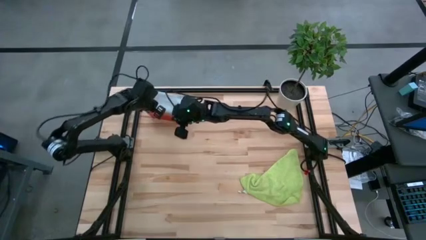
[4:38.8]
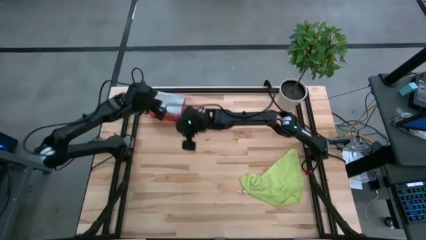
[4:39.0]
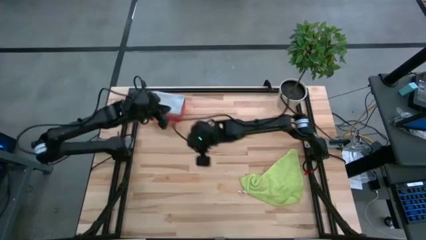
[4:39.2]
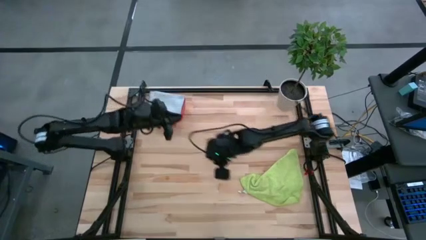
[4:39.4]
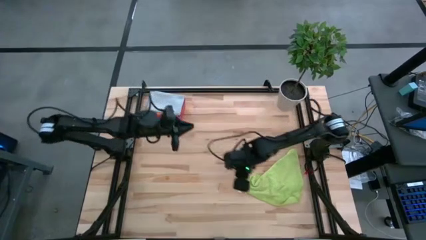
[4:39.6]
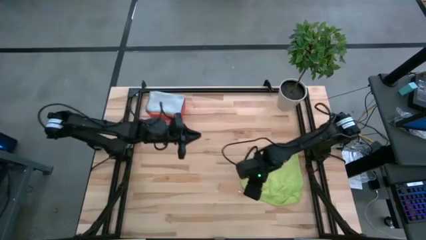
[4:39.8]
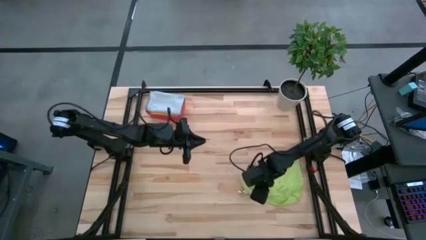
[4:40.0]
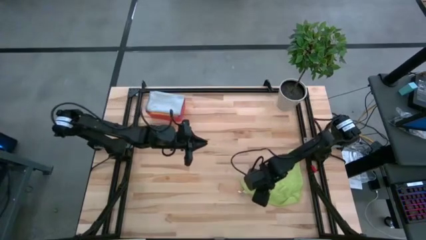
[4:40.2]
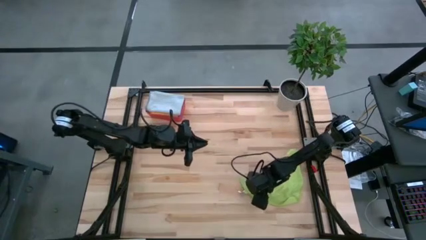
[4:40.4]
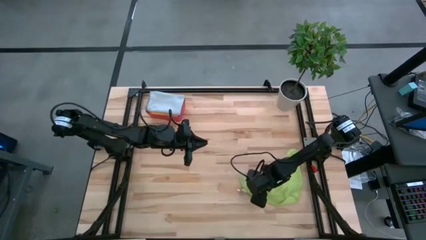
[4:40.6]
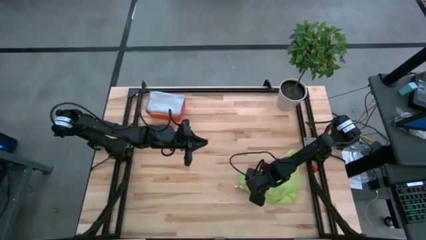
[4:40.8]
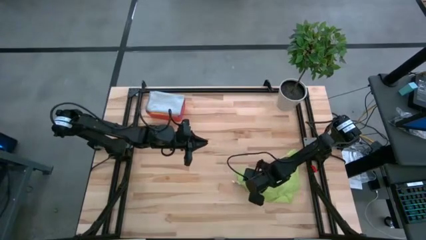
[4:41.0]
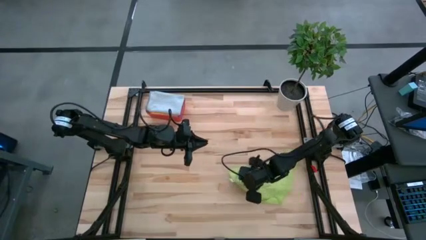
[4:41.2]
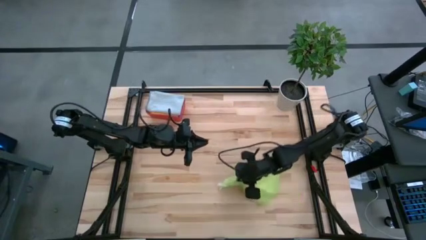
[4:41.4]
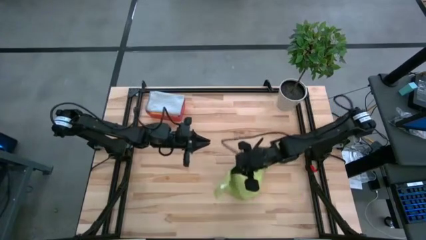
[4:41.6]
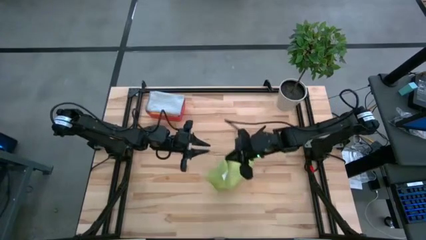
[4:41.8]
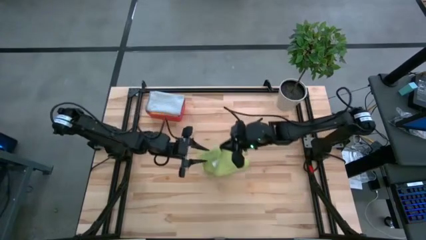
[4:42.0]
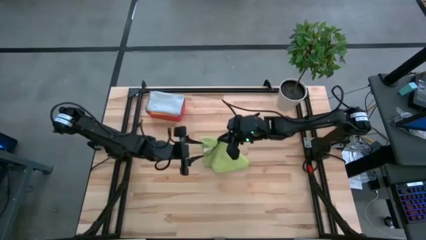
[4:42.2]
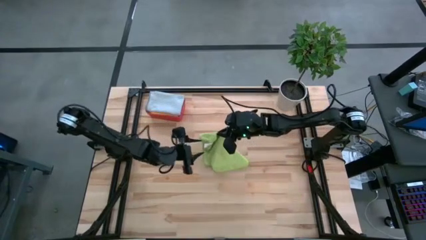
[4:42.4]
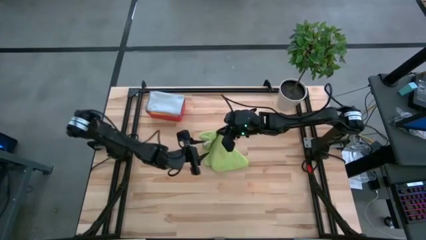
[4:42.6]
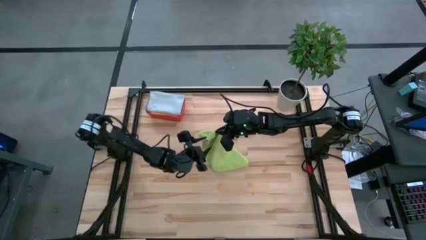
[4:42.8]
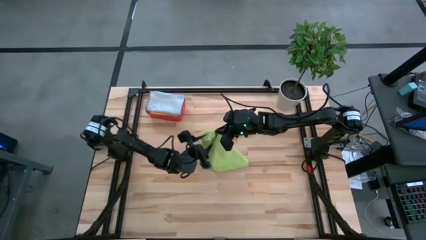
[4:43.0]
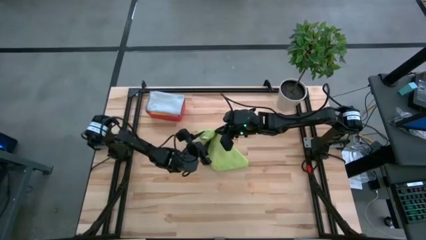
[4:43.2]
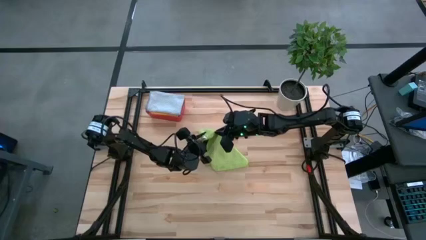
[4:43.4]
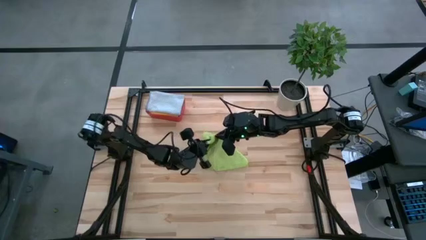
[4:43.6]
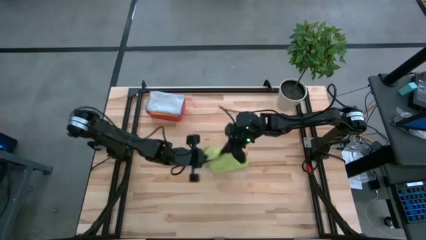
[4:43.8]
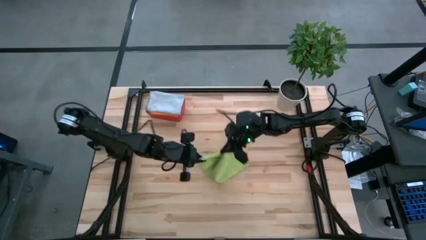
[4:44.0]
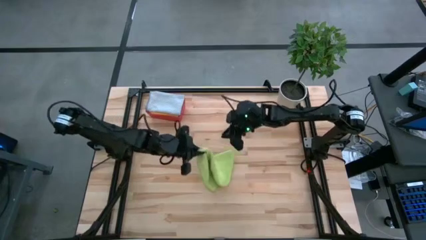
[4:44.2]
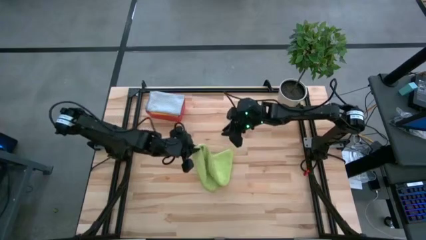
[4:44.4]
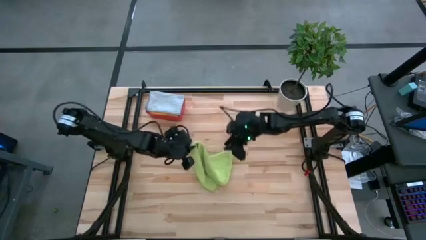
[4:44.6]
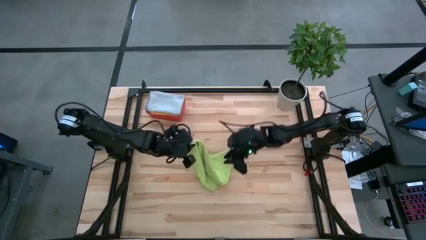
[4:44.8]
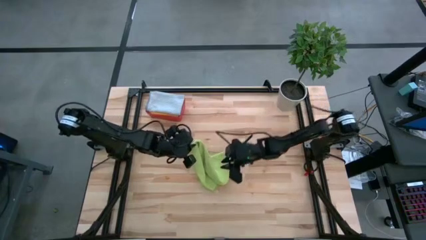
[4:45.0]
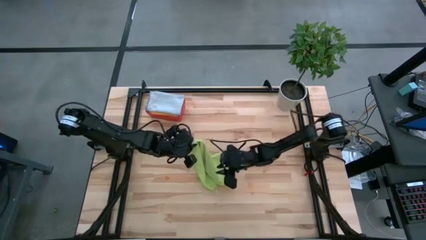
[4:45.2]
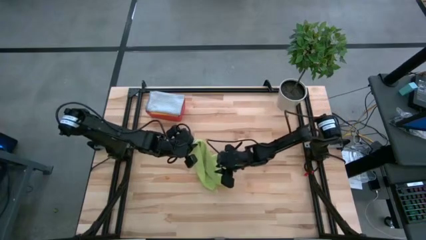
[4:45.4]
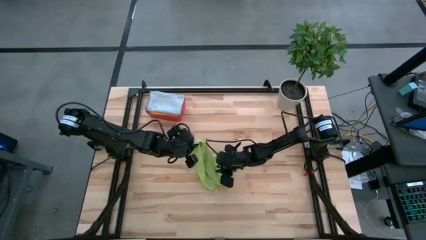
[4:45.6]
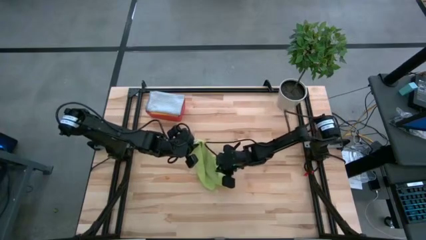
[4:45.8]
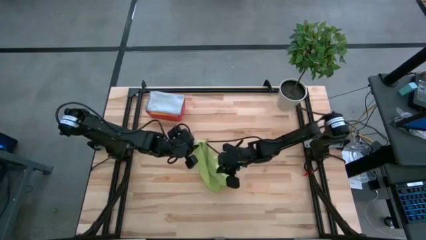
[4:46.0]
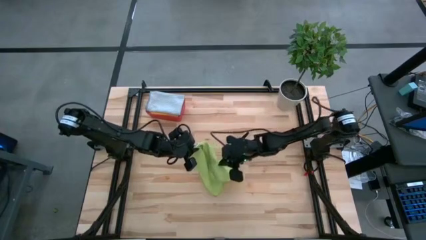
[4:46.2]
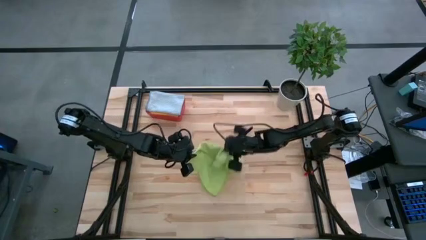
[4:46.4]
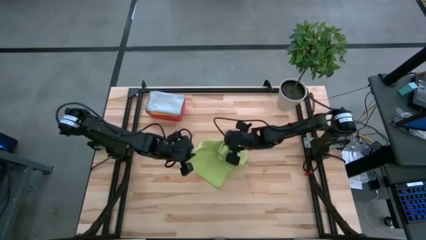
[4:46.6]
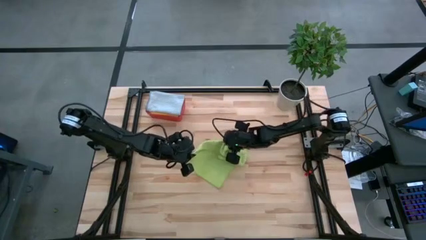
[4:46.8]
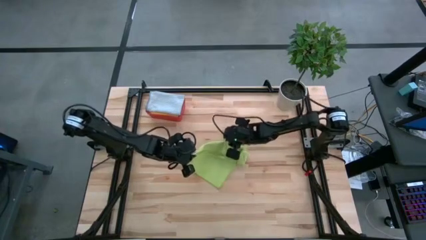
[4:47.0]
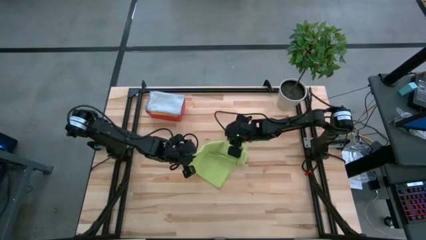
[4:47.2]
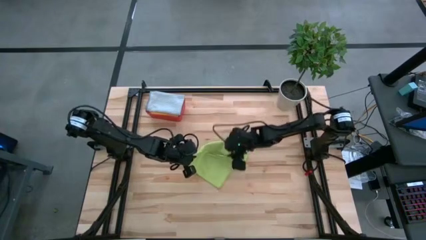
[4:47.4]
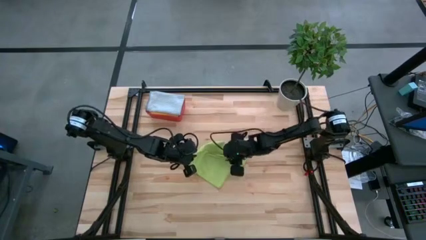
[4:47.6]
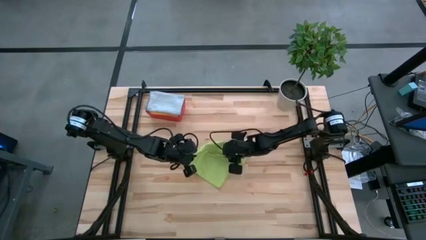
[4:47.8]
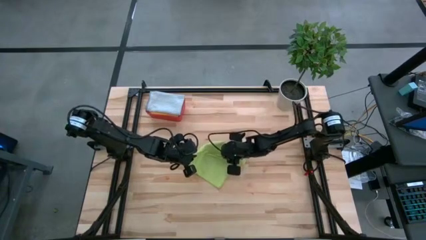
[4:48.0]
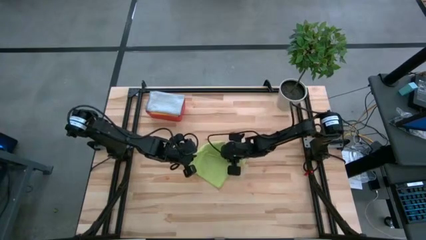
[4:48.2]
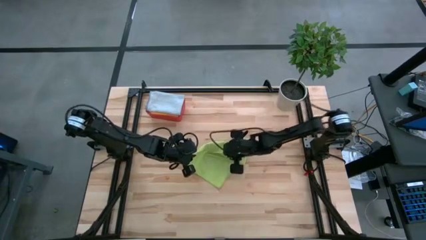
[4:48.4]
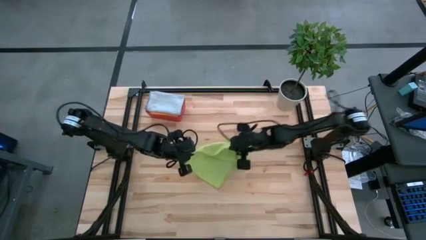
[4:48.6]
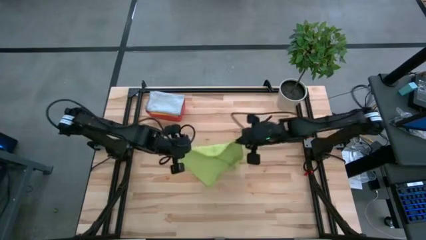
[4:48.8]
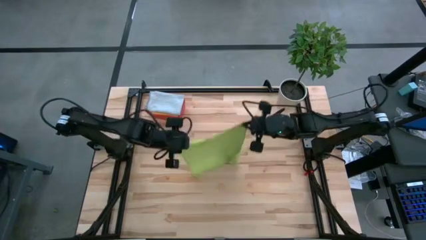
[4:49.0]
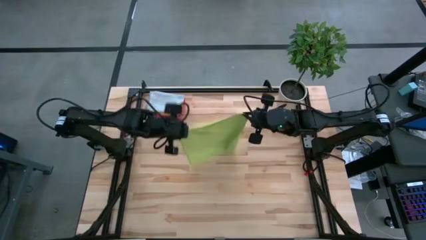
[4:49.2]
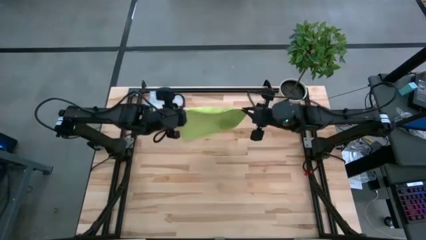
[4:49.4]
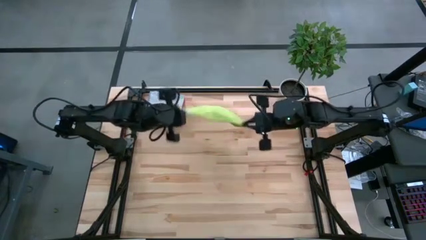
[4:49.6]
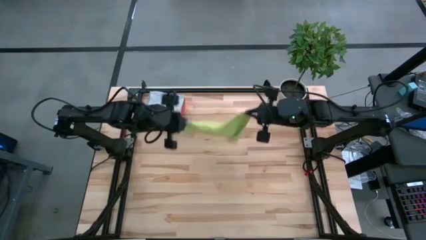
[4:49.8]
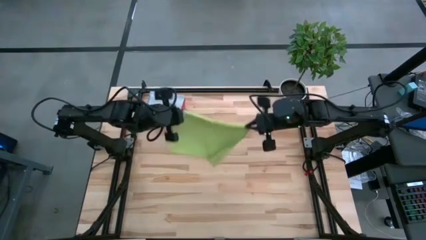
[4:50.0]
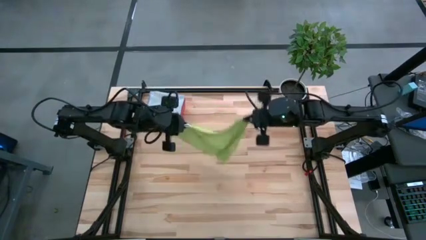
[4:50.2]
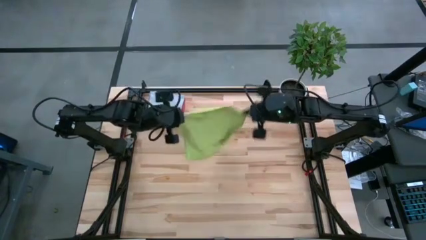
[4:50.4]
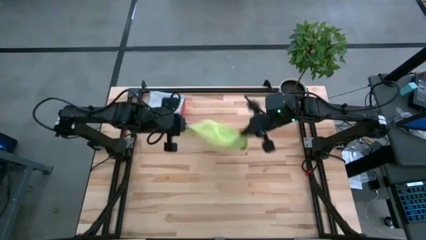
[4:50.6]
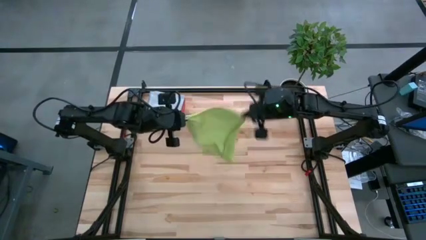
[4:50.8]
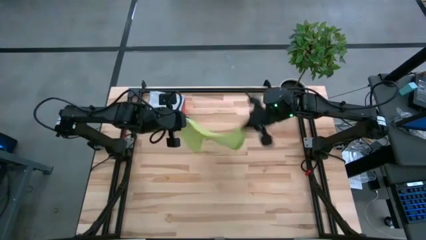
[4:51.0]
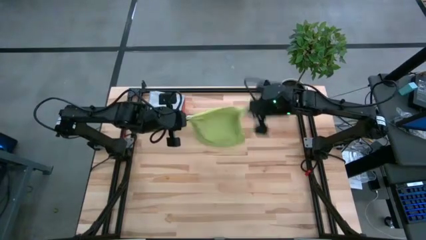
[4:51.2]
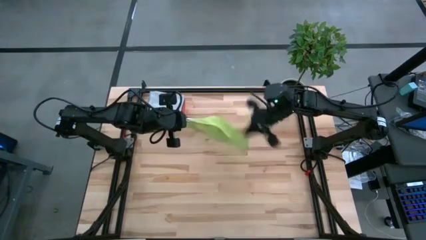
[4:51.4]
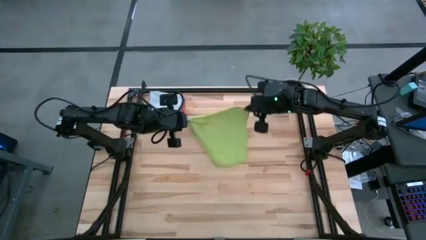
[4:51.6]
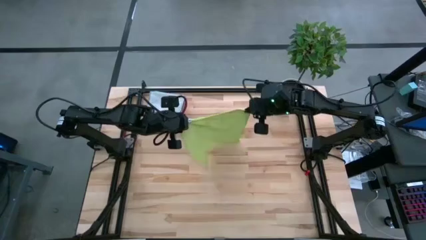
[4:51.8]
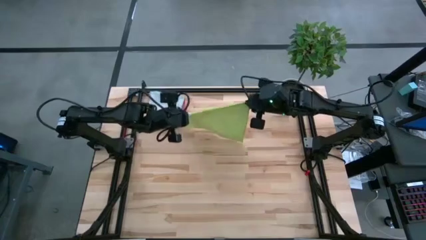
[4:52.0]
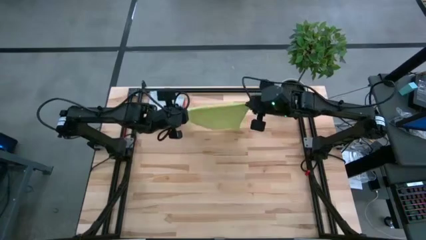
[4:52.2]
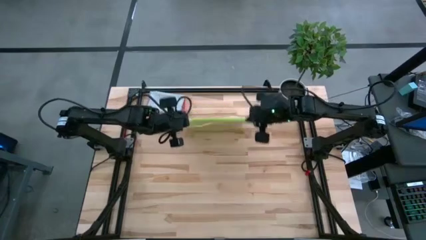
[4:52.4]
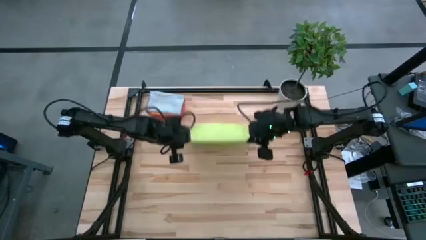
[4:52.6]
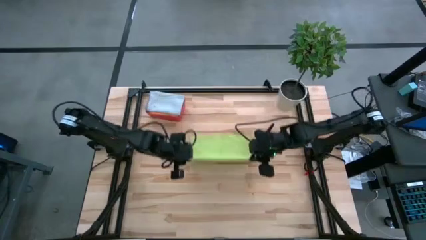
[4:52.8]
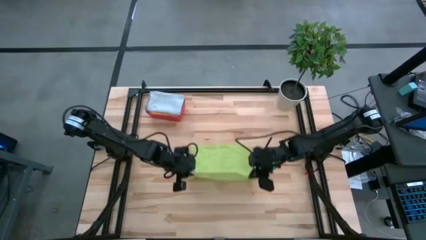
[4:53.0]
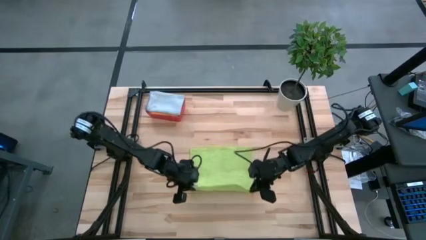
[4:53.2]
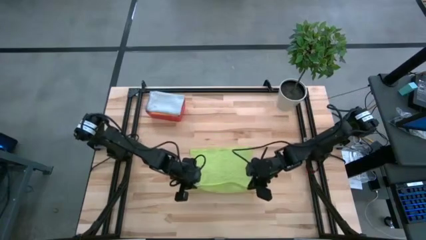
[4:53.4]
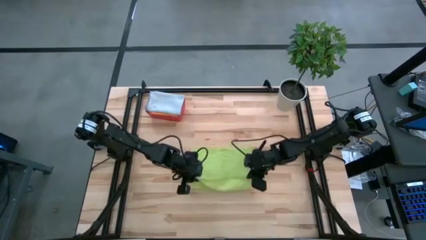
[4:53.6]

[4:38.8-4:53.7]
Task: Fold microfiber towels
Fold the light green microfiber cloth
